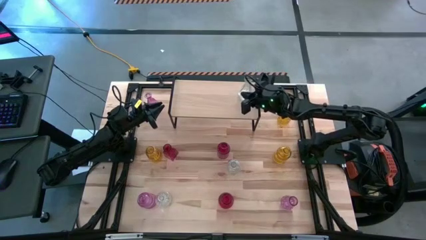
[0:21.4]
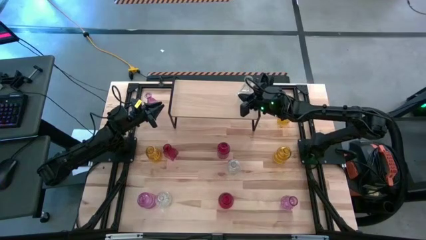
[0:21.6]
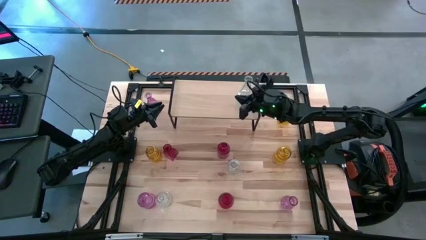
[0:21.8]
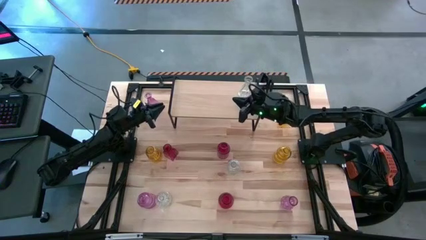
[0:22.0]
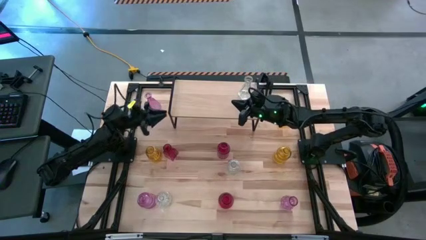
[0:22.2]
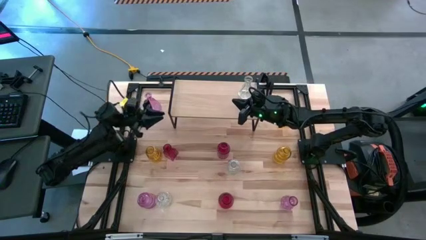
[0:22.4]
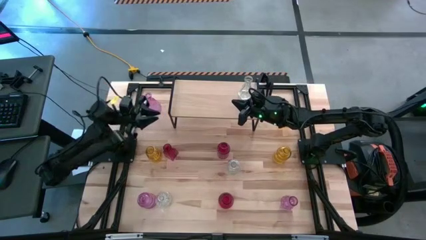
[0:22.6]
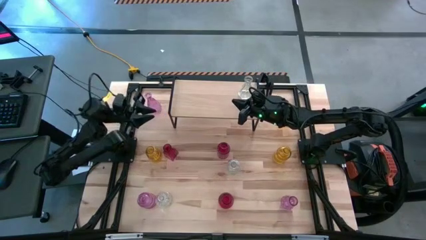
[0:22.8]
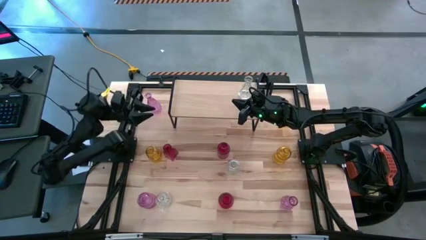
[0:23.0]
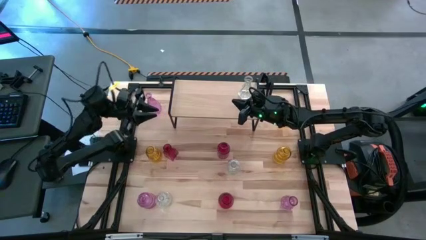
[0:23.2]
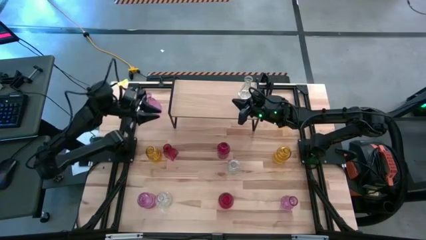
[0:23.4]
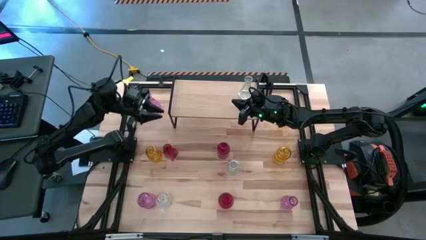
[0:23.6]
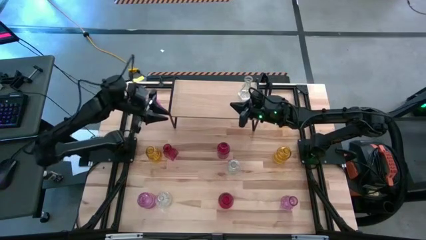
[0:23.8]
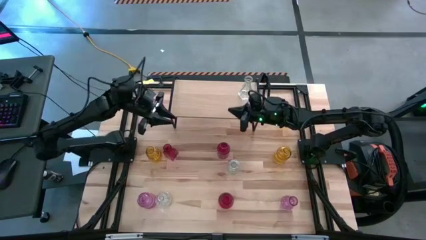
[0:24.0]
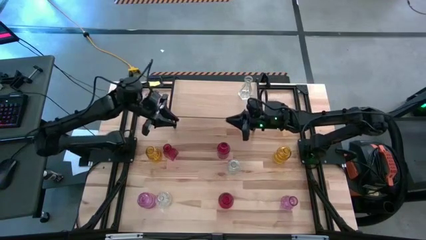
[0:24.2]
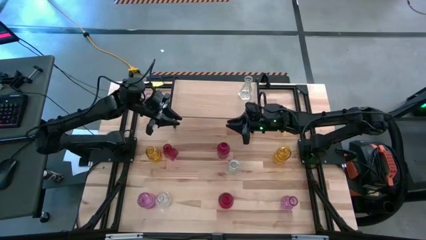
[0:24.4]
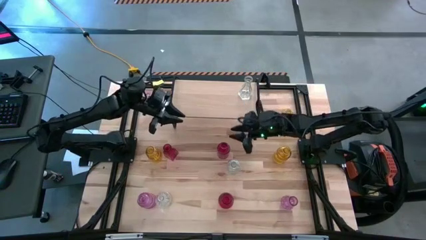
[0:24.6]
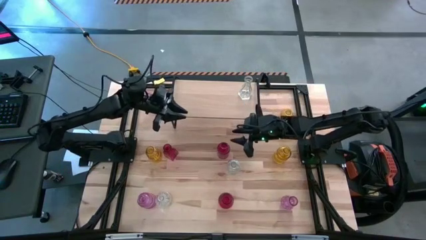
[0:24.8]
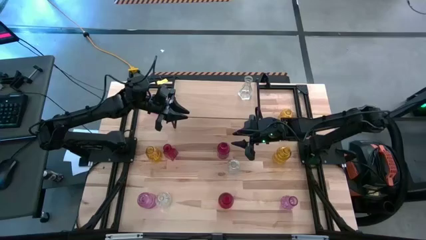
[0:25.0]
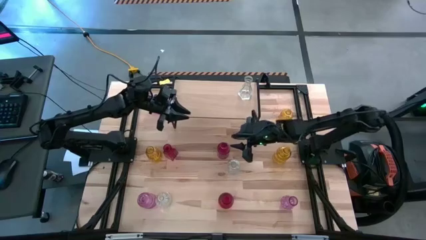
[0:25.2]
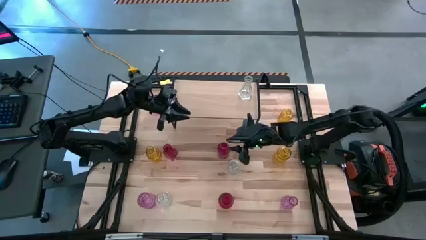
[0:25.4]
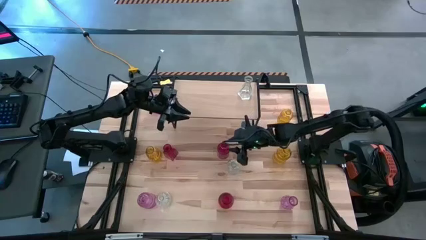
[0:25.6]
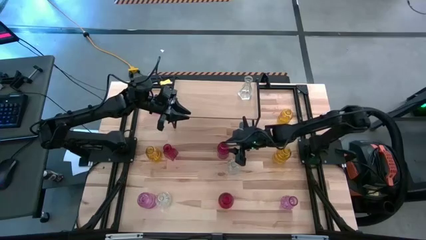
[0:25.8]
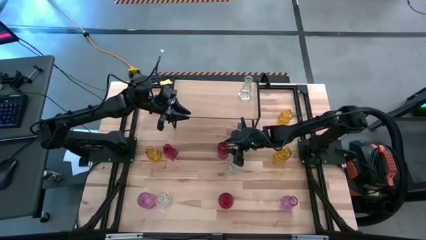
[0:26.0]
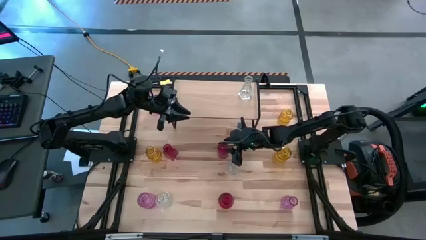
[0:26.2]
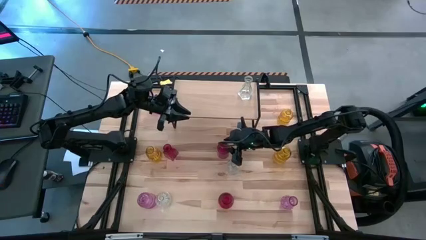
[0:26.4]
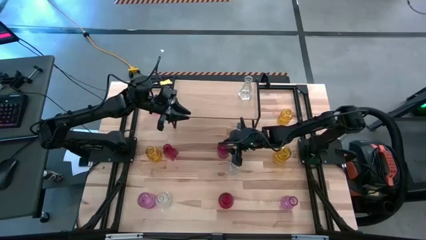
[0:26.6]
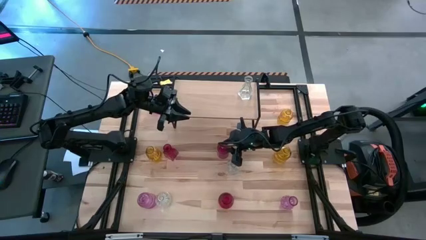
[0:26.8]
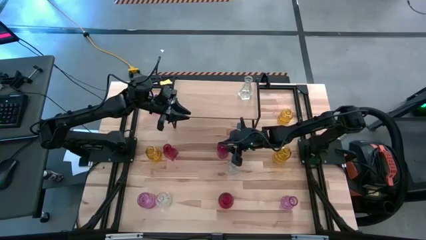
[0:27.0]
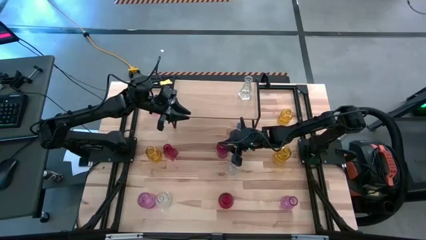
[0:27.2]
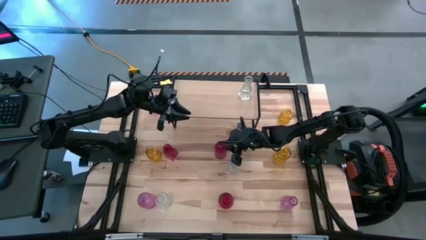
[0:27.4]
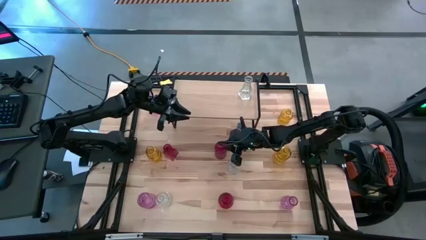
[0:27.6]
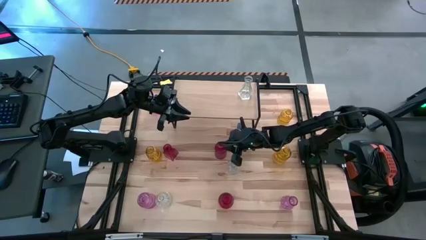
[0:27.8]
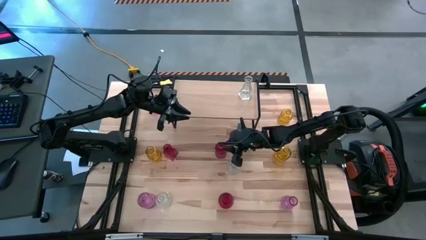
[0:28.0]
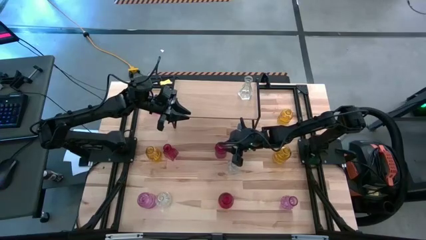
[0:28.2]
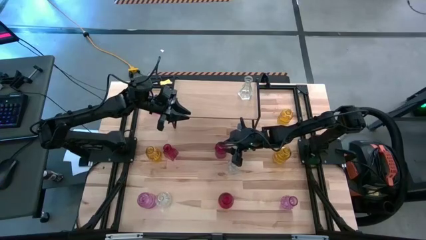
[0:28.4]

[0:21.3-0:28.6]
Task: sort vases onto shelf
Put the top right red vase on the shelf

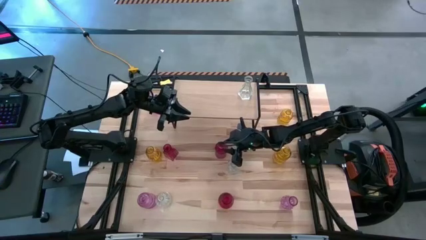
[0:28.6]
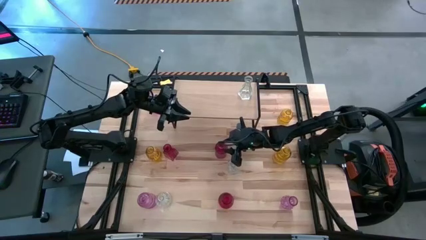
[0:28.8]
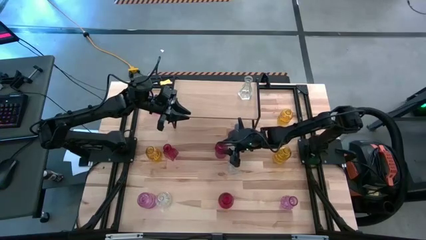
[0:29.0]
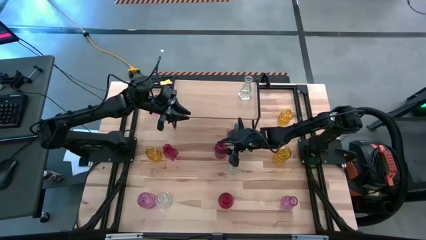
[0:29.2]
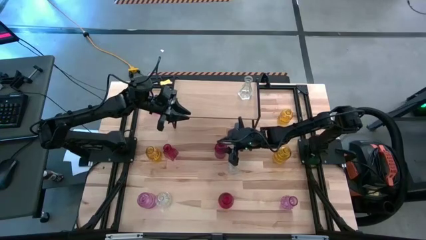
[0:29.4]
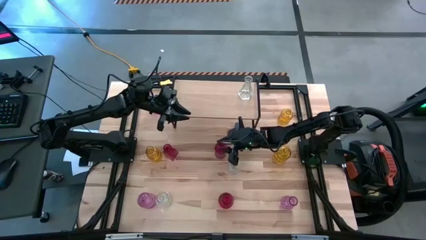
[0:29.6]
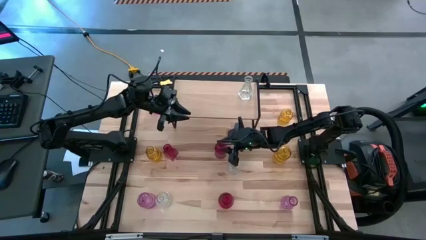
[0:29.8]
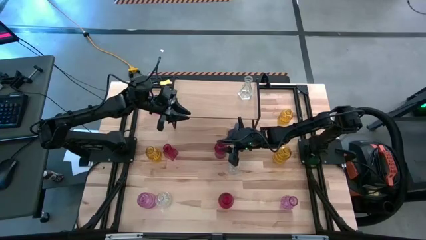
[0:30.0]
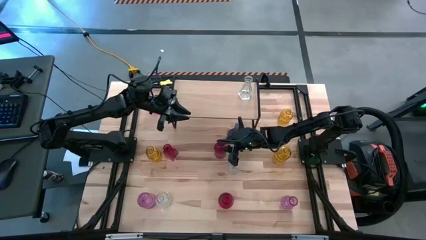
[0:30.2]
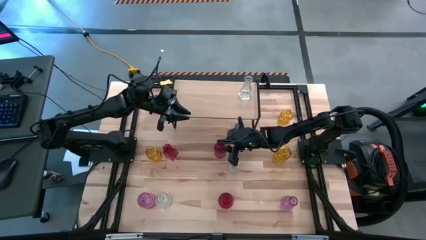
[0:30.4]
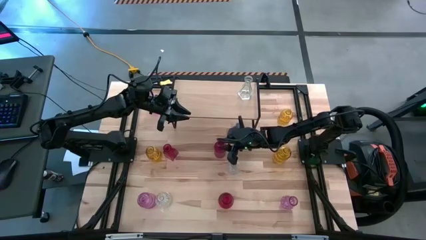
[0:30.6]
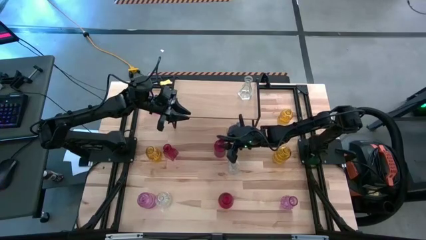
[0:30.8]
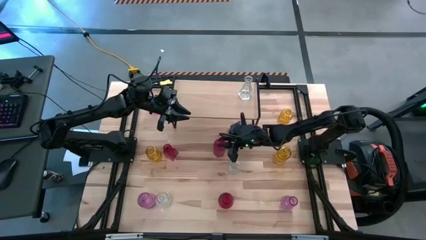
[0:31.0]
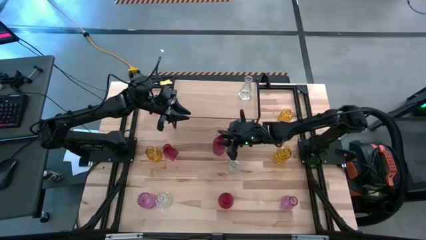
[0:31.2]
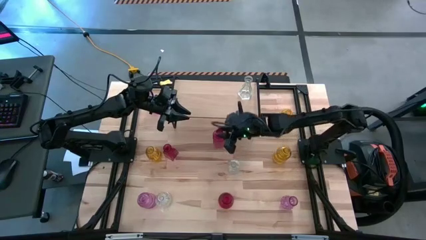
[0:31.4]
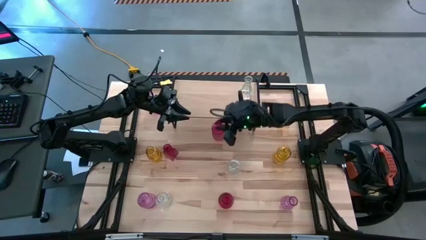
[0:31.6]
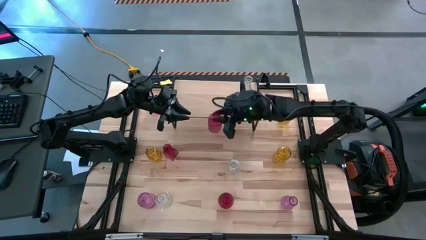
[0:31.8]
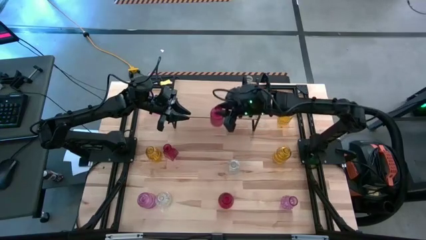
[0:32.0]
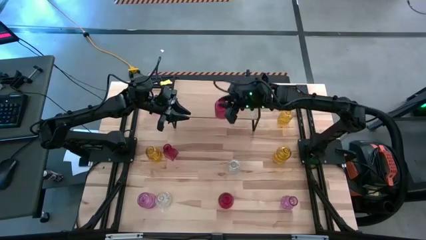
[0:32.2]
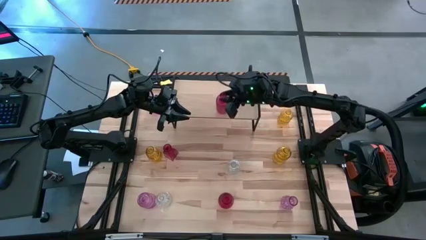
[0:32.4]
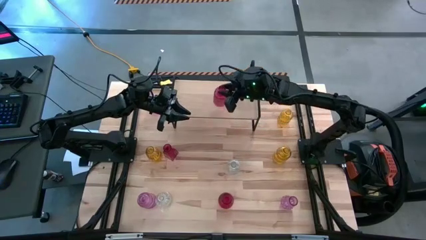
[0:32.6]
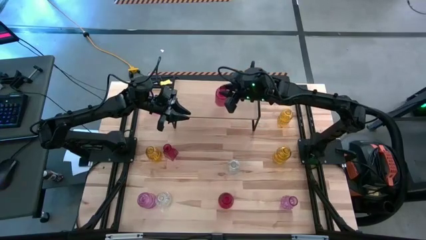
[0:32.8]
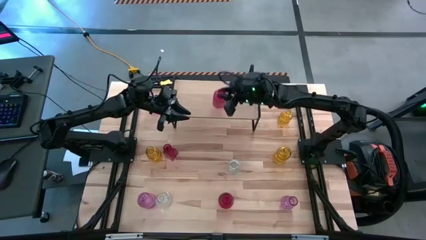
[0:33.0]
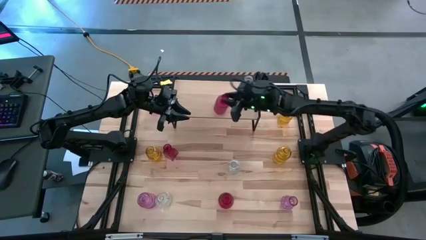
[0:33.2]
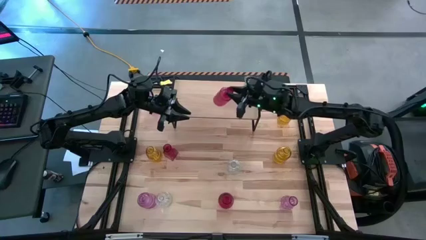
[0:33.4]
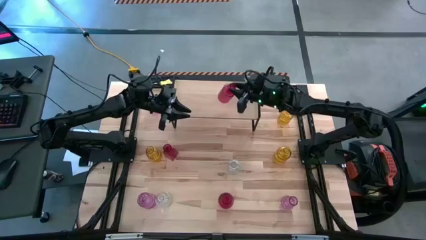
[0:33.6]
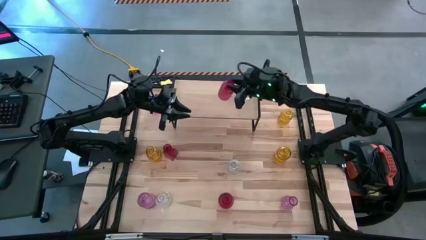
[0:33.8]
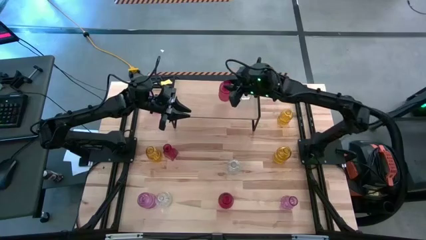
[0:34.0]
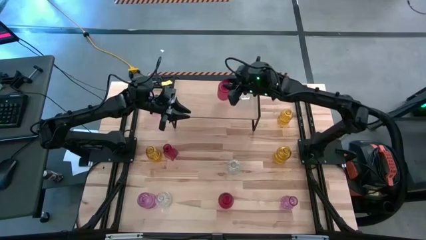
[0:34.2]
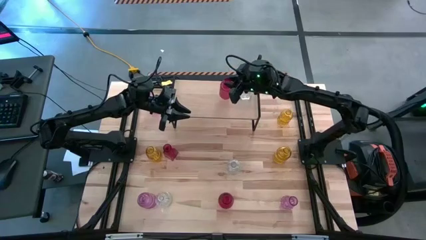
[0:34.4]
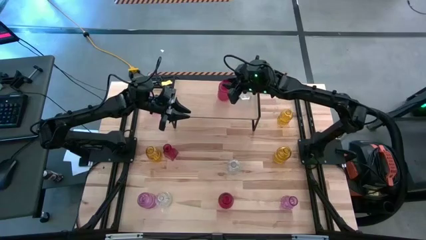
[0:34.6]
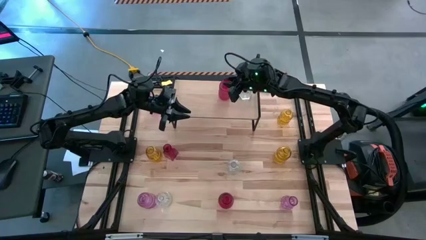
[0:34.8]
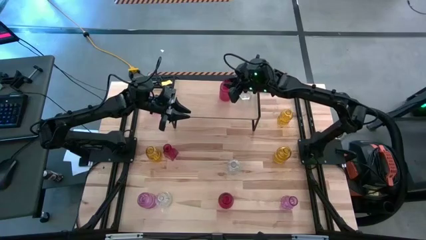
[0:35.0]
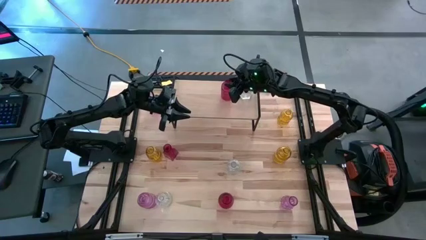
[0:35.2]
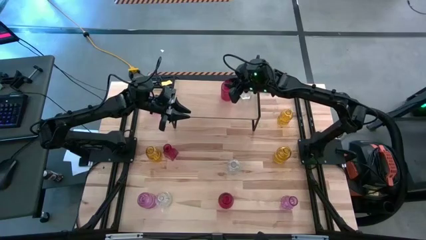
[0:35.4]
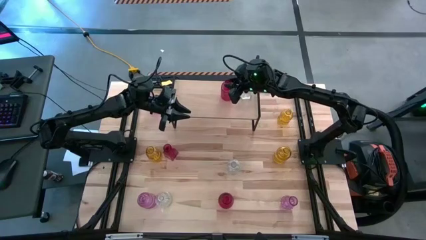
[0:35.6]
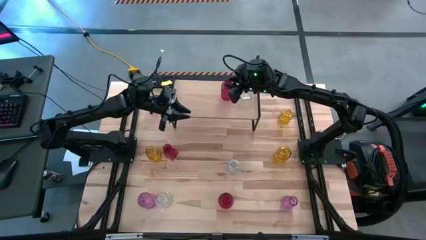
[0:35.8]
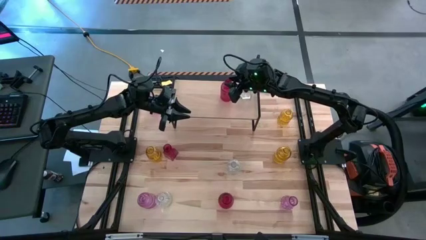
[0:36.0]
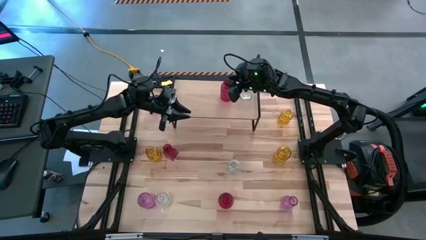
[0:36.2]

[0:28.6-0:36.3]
Put the top right red vase on the shelf
